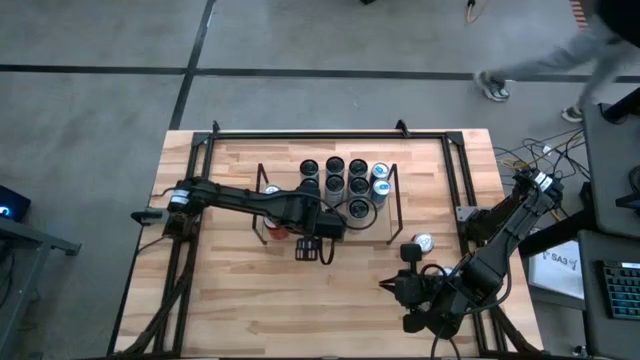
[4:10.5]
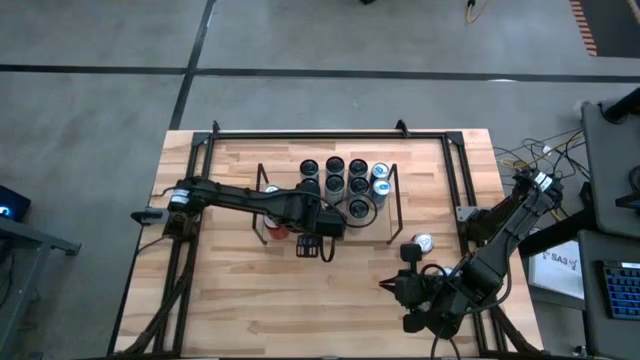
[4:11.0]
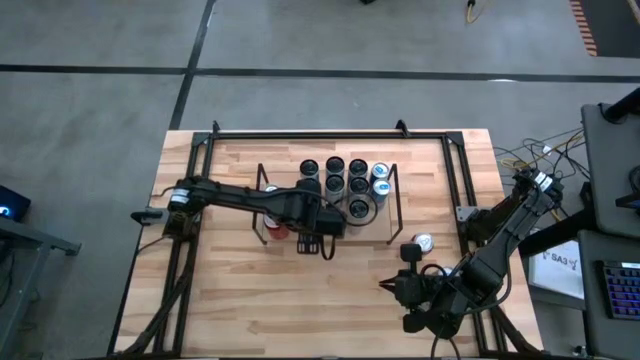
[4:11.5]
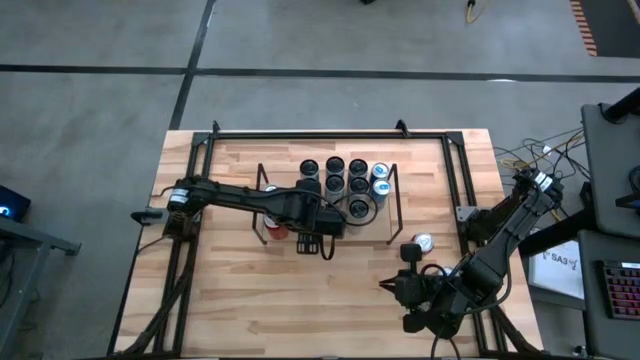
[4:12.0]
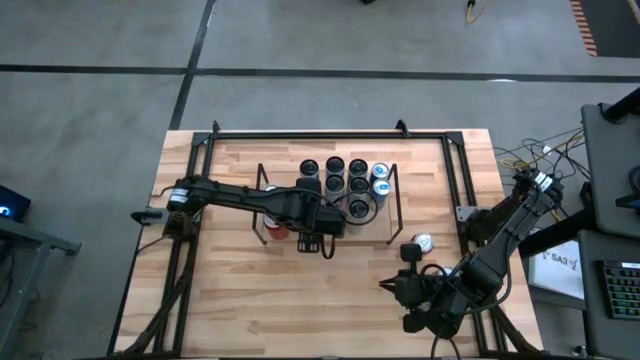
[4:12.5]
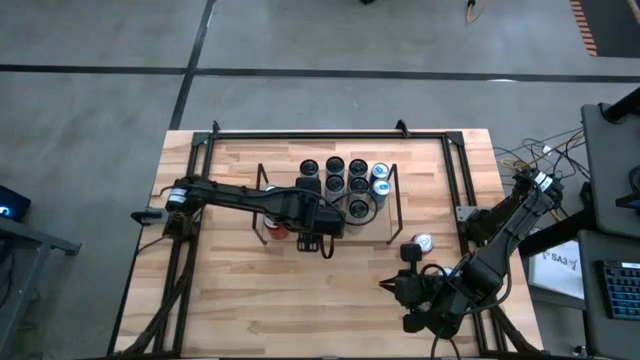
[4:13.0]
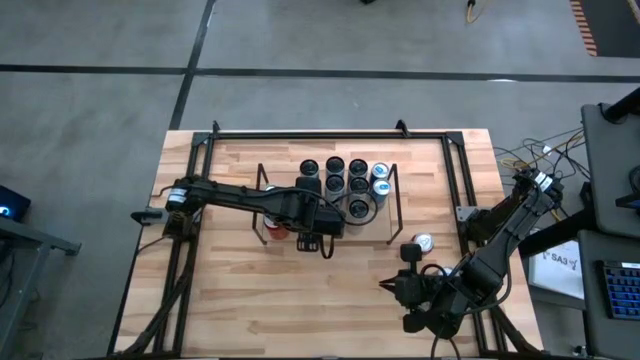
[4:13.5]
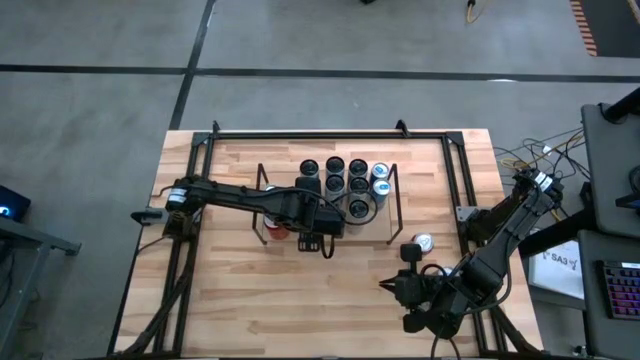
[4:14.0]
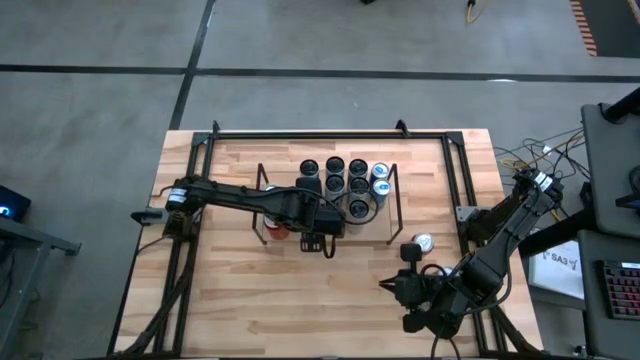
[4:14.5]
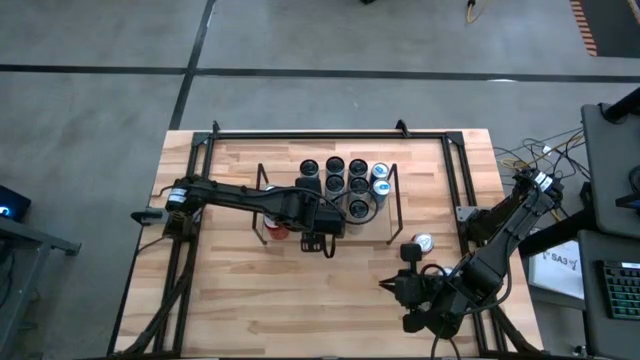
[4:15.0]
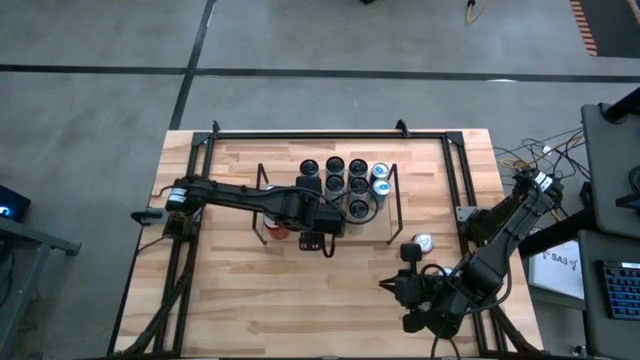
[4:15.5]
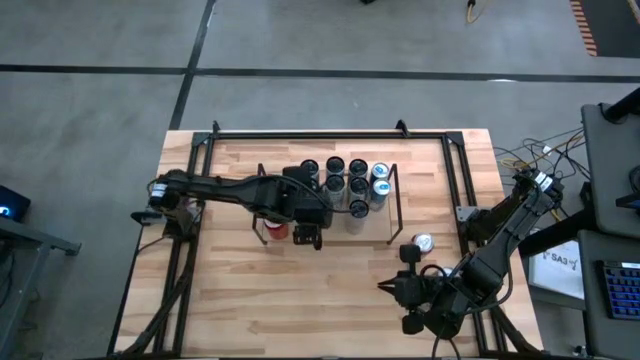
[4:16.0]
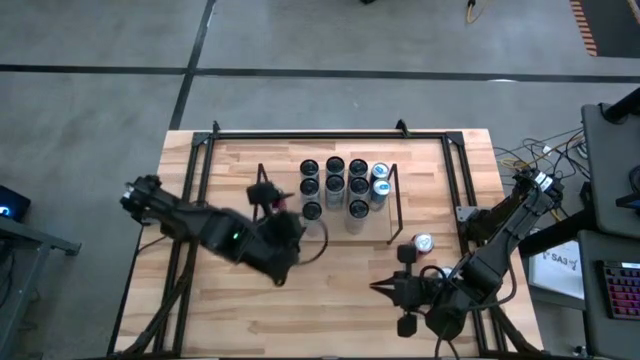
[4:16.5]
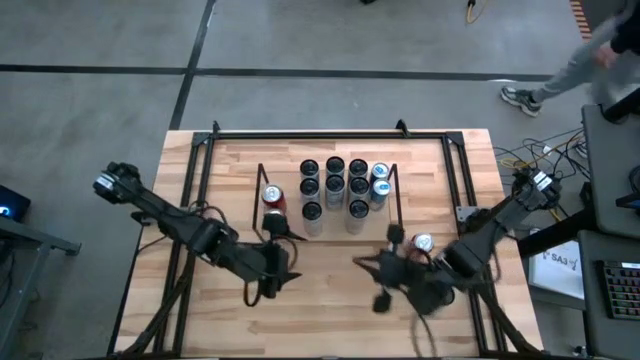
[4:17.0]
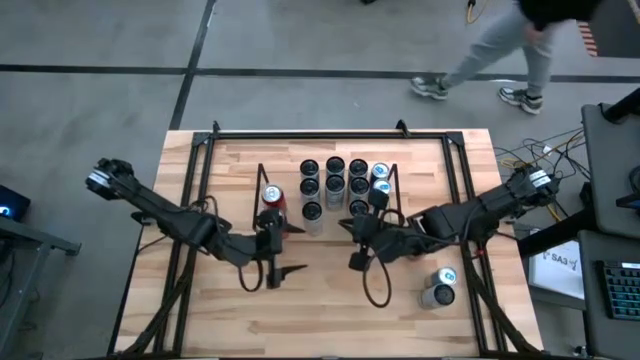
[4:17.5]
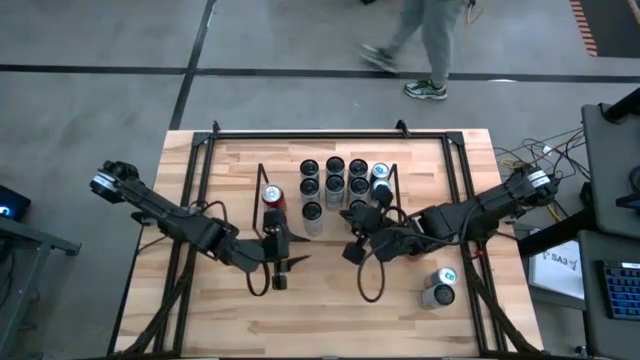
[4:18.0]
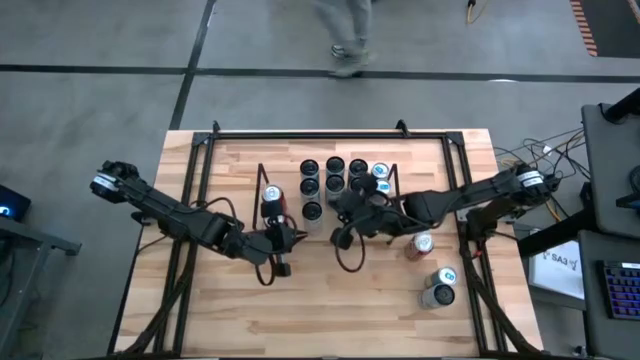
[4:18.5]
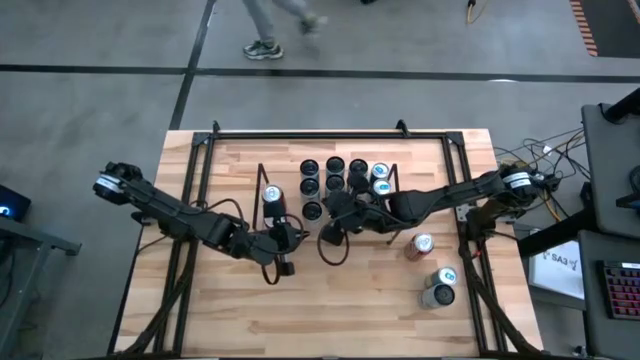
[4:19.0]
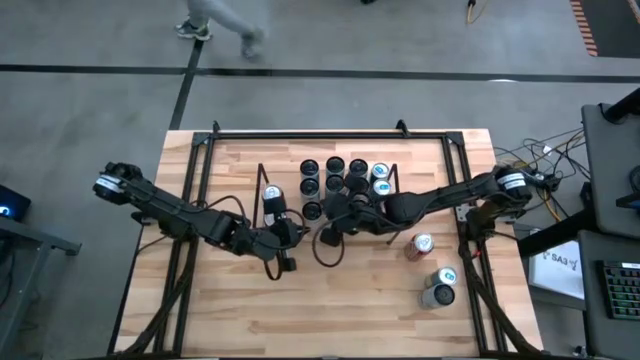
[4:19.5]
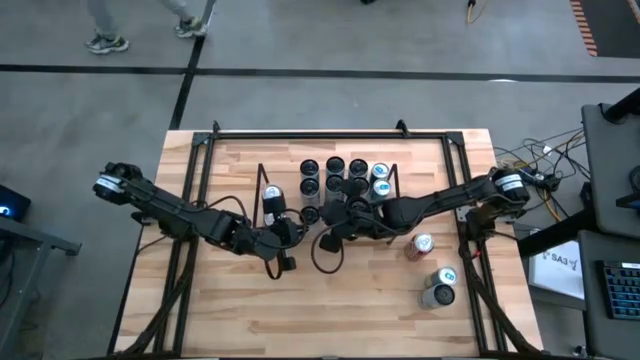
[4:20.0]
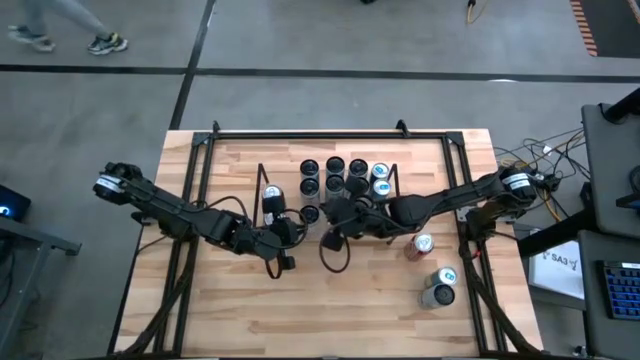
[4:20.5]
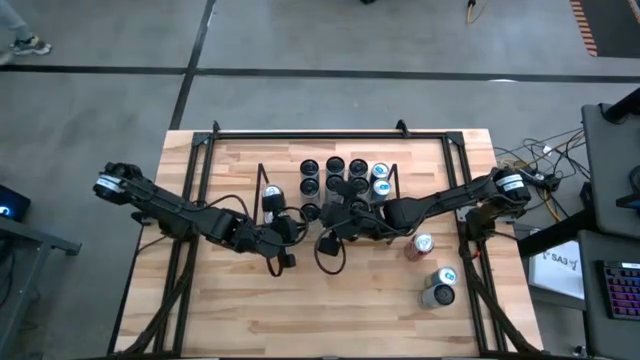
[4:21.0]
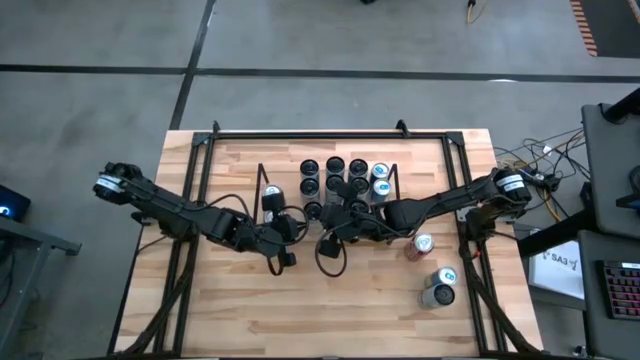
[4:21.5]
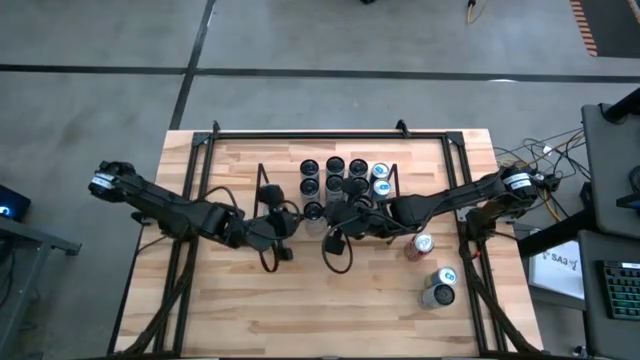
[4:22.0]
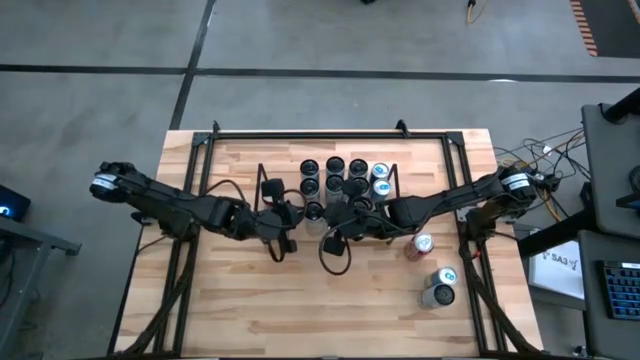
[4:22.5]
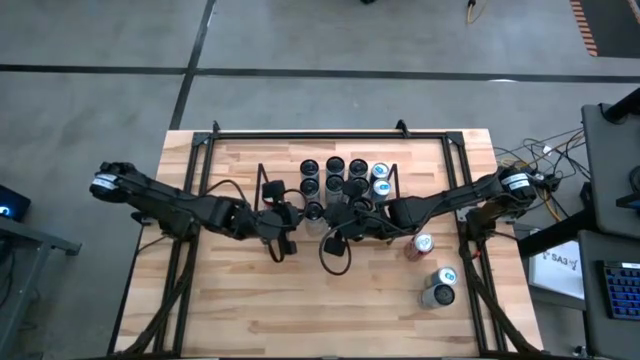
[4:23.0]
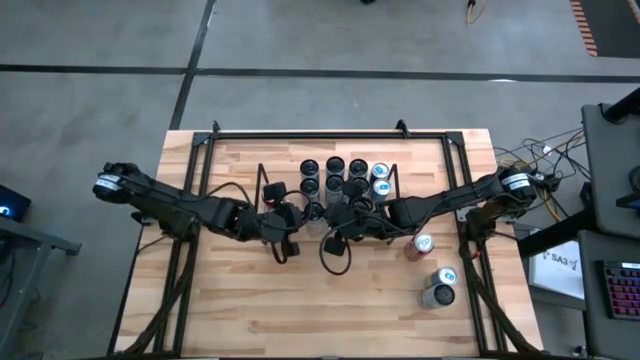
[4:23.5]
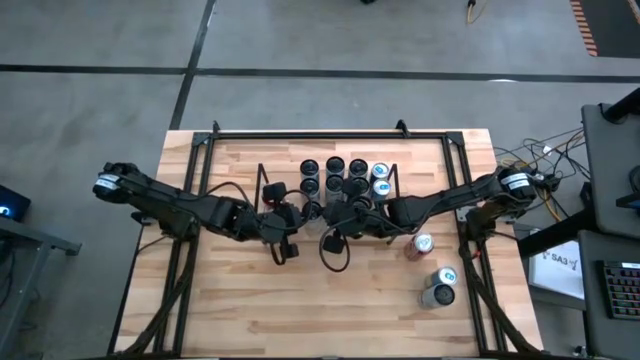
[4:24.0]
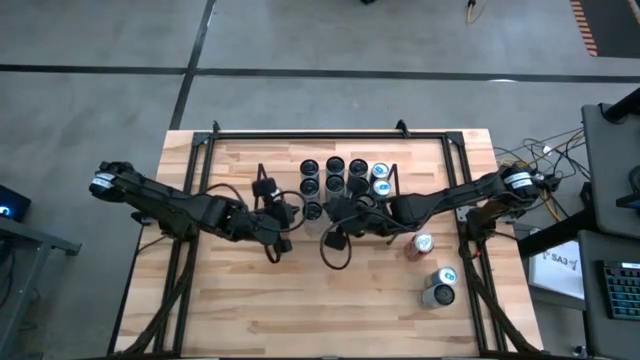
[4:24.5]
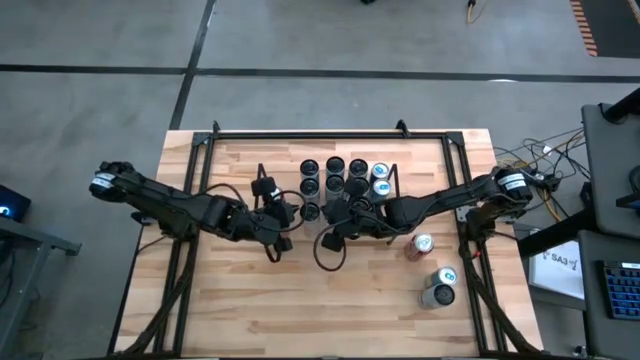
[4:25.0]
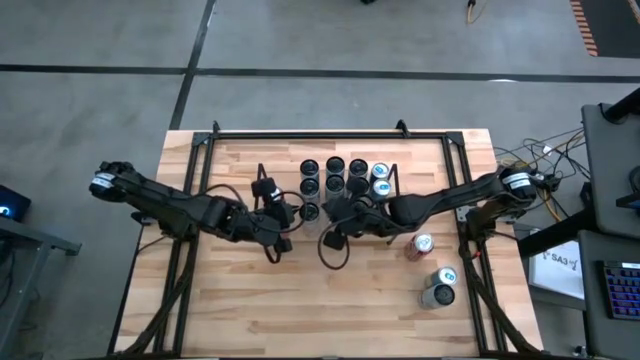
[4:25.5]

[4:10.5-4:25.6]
Task: Place canned beverage on shelf
Put the white and pink soda can on the shelf aligned with the other white and pink soda can

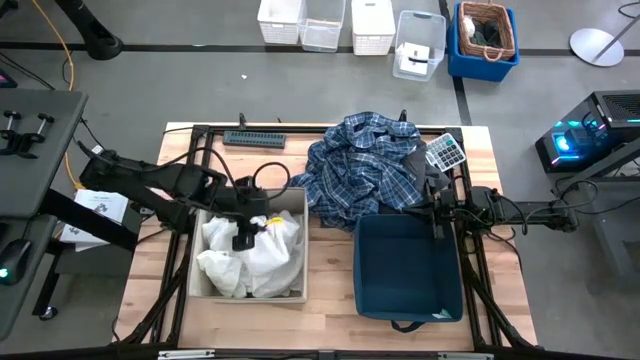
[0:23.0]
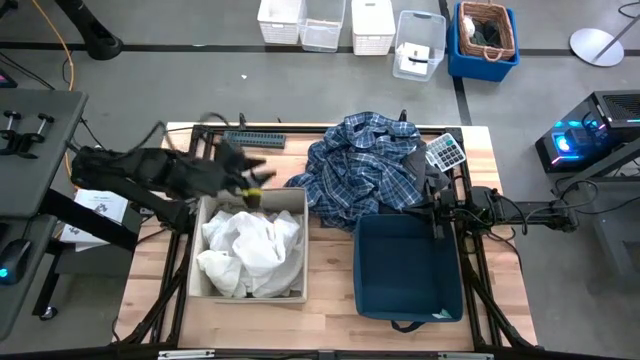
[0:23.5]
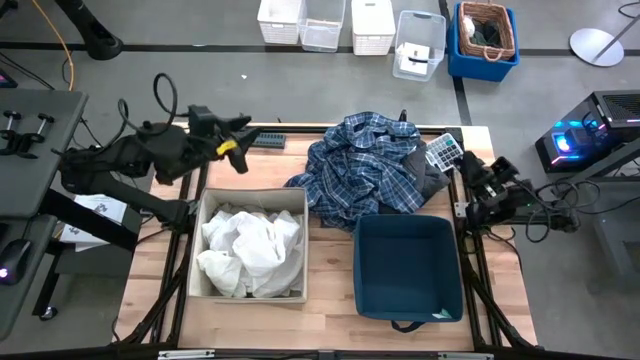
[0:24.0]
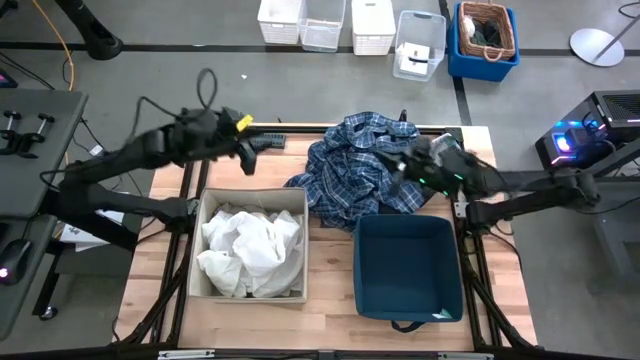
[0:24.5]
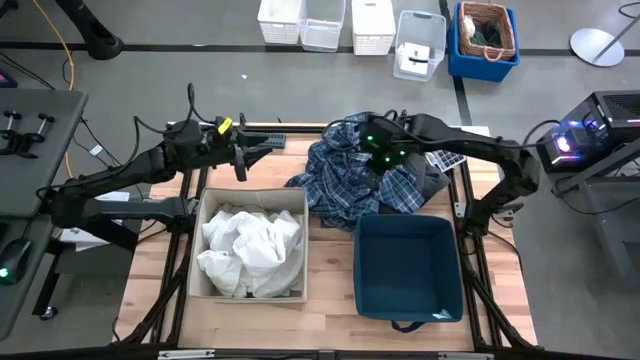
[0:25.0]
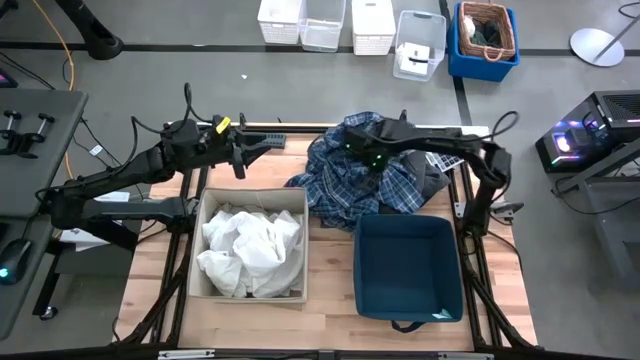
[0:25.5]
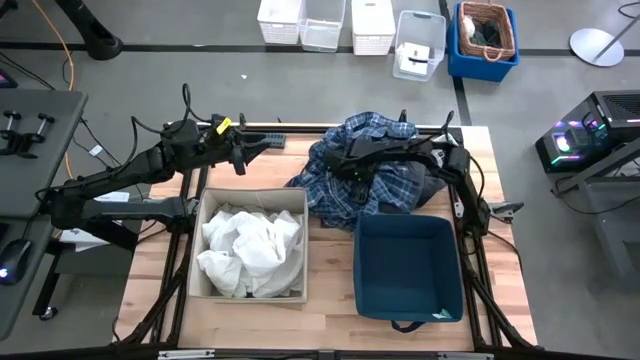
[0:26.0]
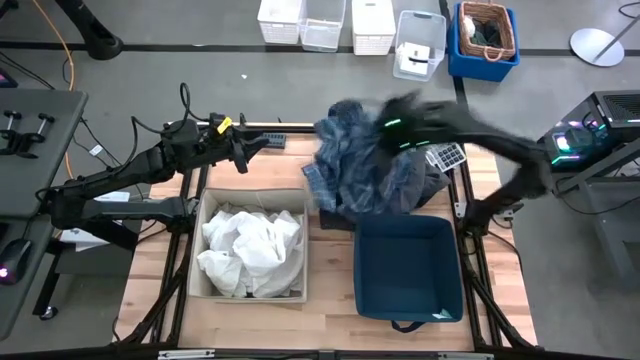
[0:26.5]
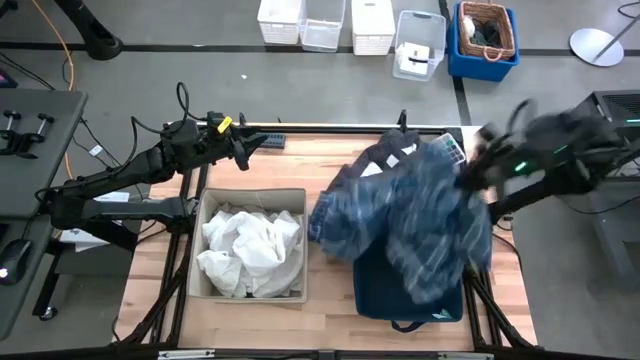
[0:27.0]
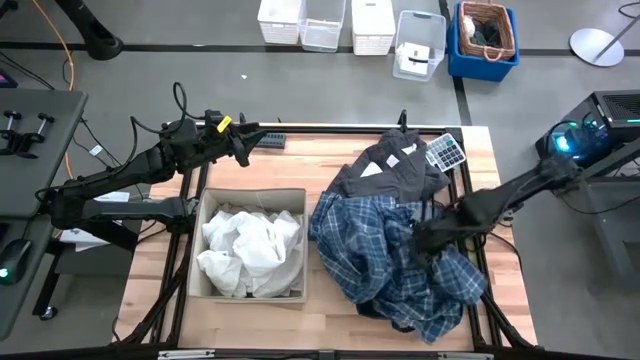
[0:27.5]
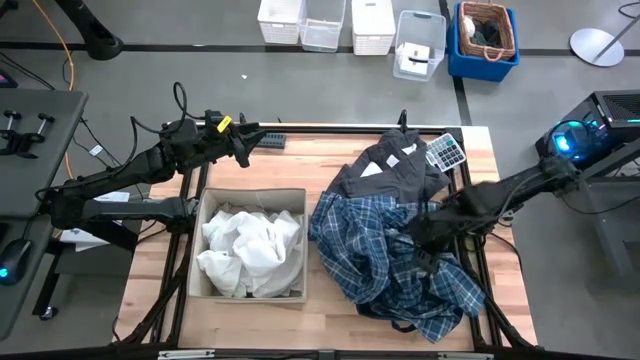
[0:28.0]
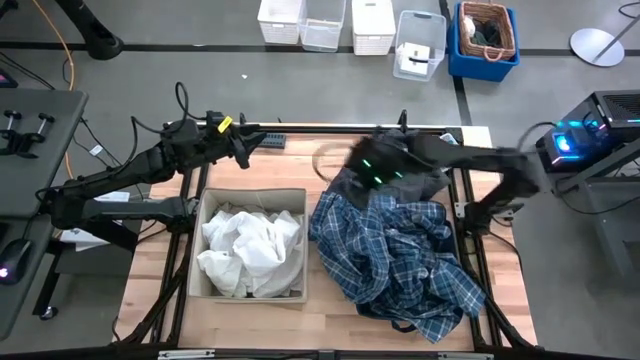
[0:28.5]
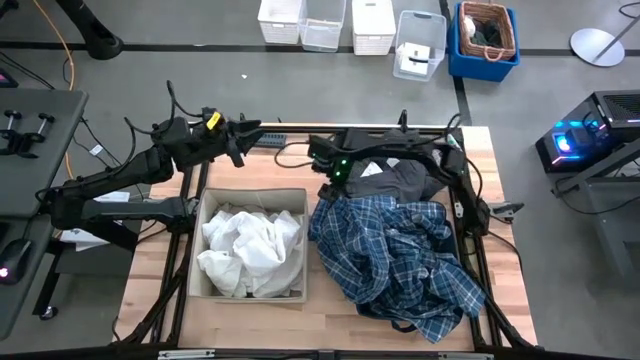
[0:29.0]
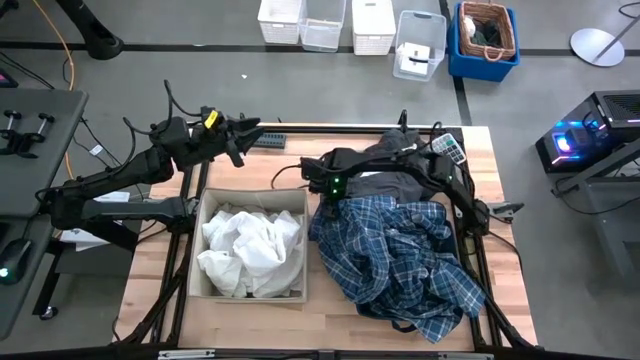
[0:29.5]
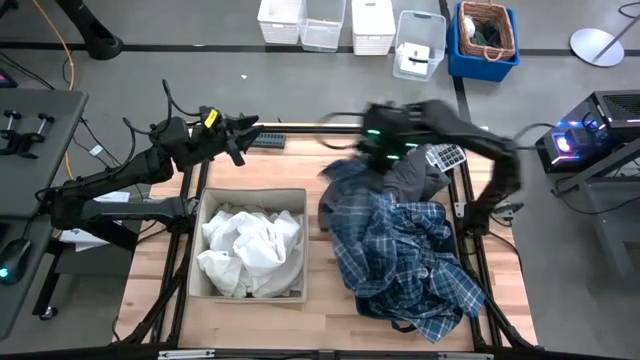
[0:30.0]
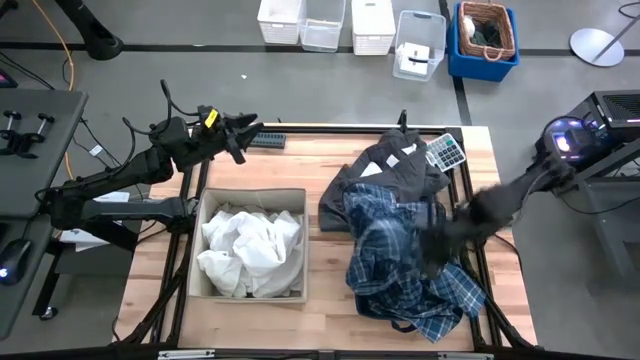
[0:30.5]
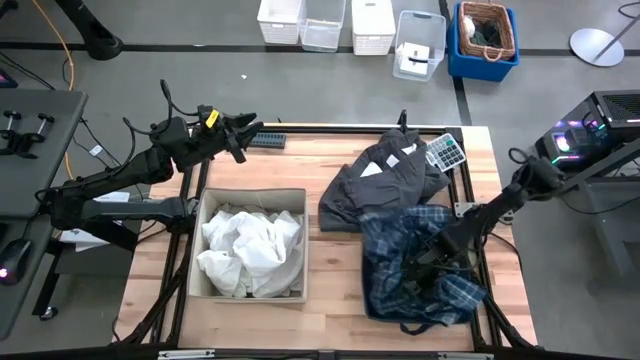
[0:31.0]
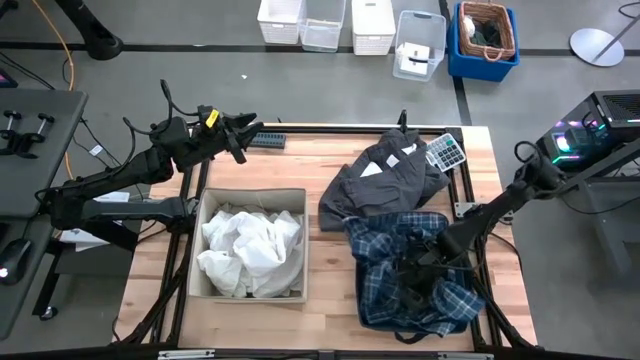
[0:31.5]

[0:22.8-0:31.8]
Task: Sort clothes
Put the blue checkered polo into the blue laundry bin
